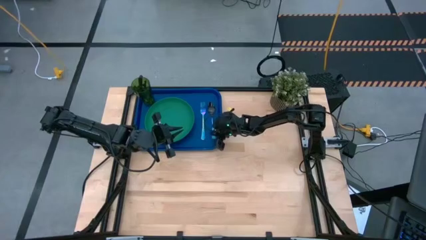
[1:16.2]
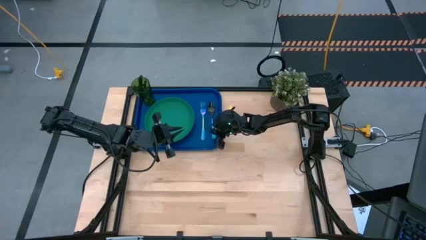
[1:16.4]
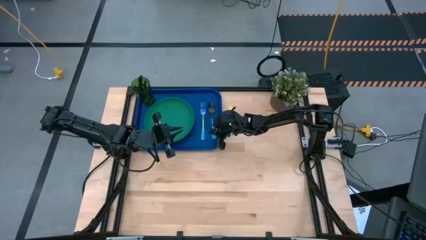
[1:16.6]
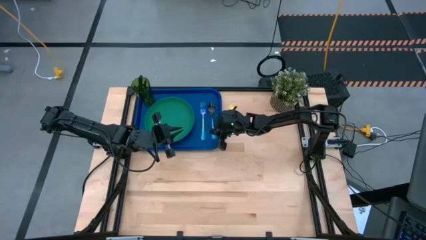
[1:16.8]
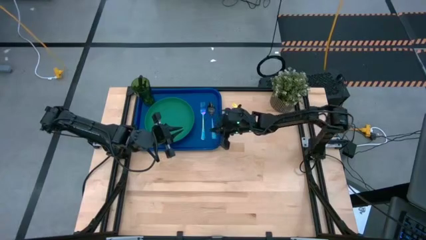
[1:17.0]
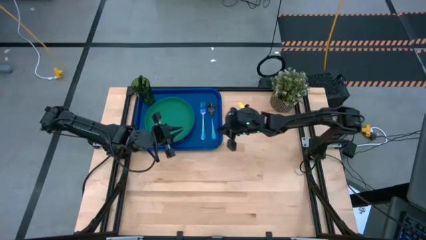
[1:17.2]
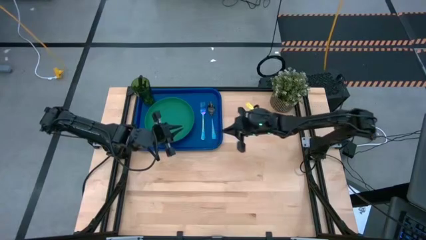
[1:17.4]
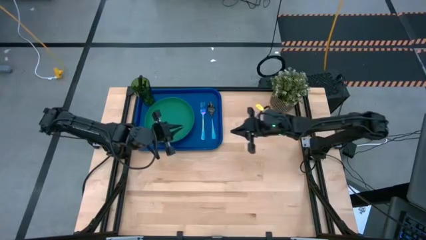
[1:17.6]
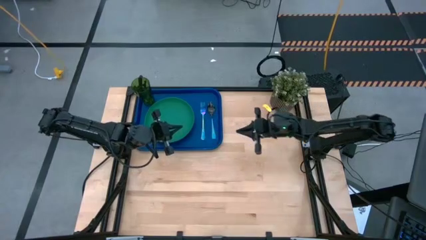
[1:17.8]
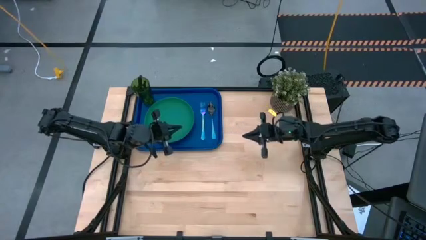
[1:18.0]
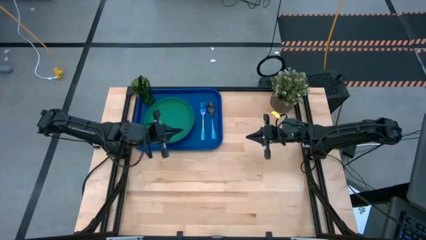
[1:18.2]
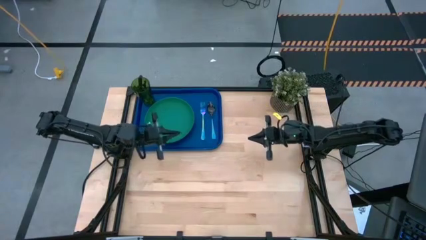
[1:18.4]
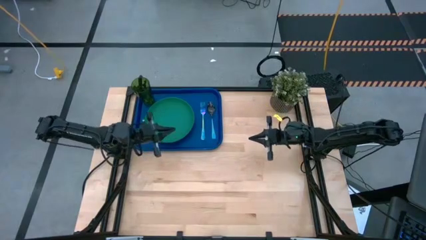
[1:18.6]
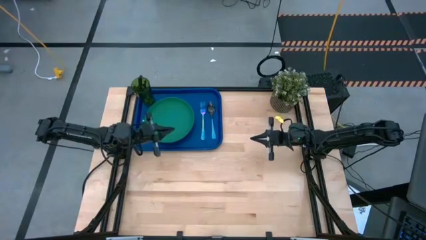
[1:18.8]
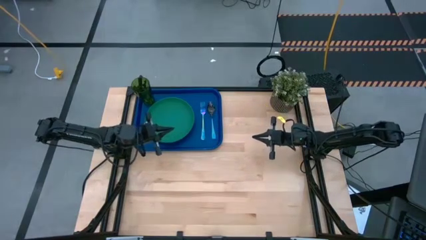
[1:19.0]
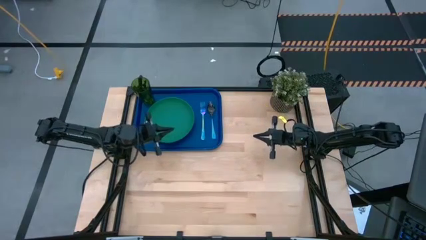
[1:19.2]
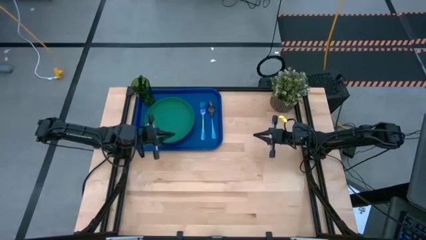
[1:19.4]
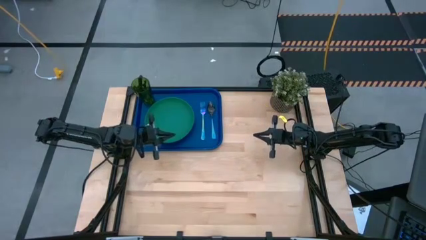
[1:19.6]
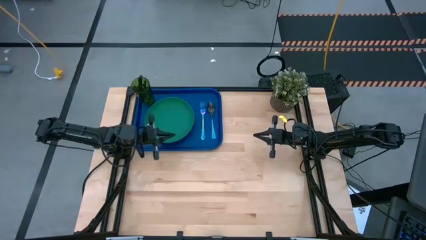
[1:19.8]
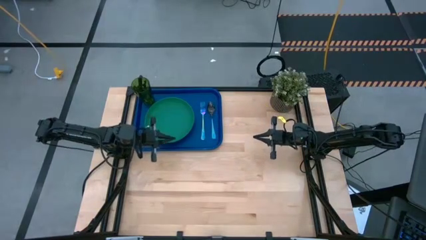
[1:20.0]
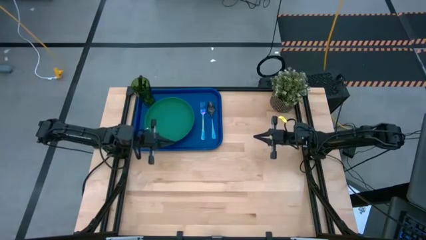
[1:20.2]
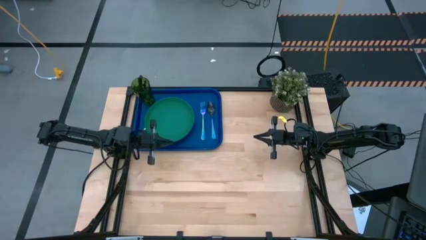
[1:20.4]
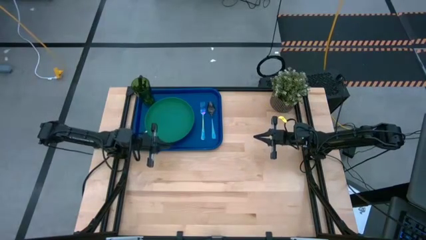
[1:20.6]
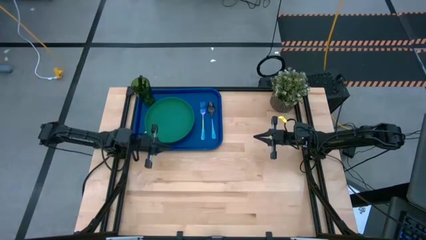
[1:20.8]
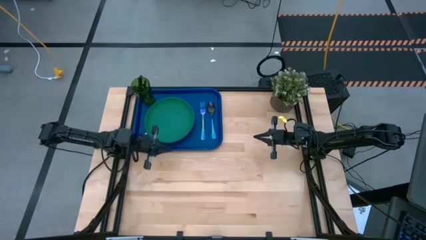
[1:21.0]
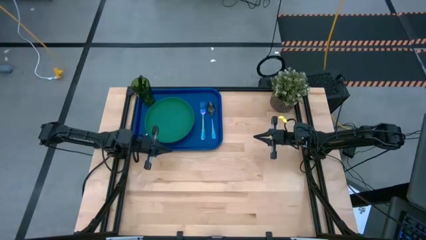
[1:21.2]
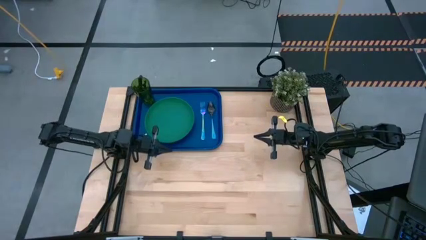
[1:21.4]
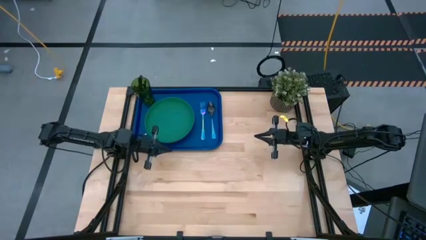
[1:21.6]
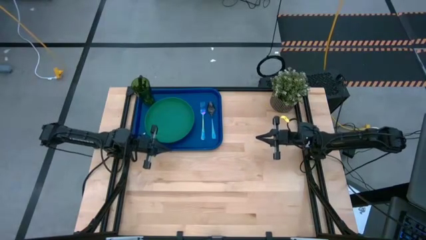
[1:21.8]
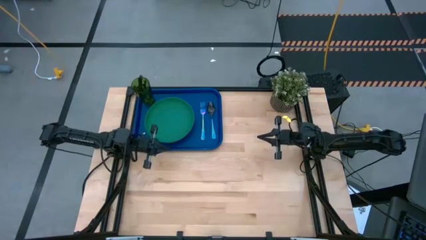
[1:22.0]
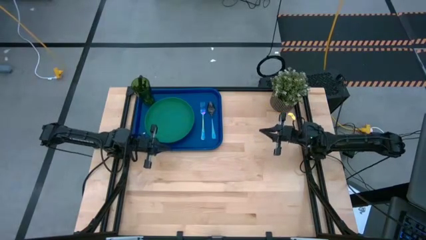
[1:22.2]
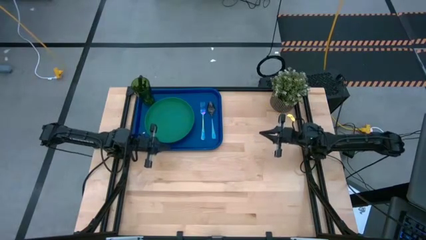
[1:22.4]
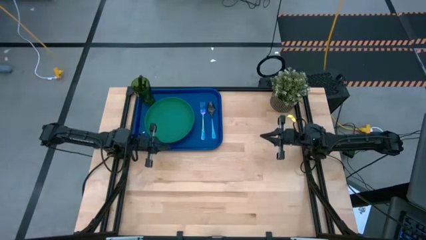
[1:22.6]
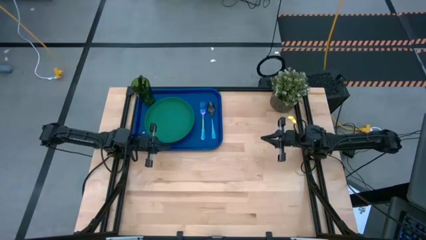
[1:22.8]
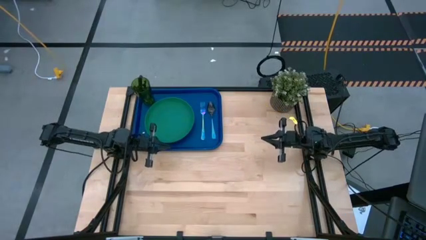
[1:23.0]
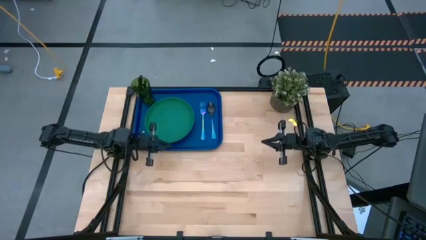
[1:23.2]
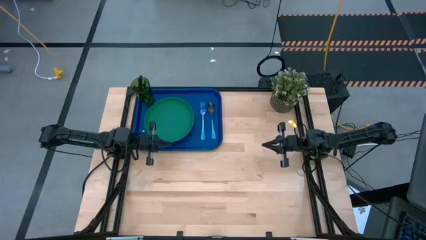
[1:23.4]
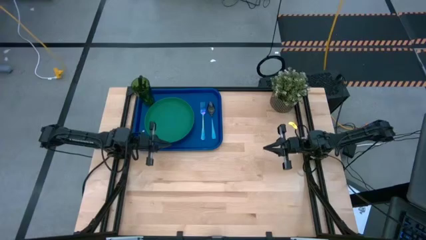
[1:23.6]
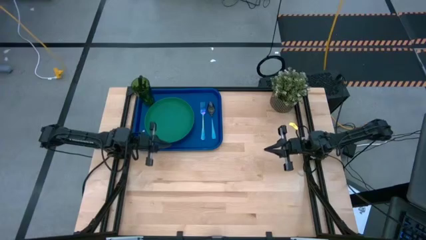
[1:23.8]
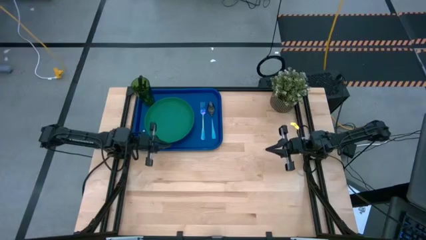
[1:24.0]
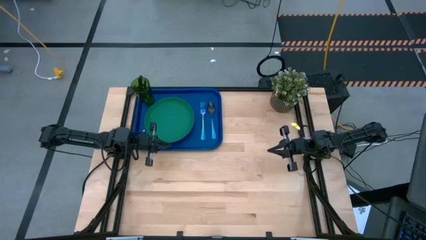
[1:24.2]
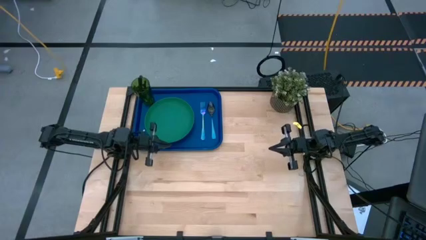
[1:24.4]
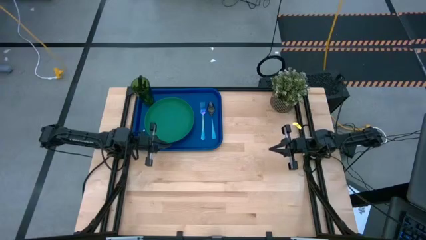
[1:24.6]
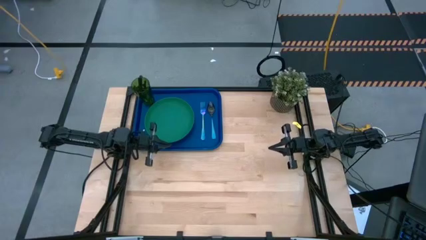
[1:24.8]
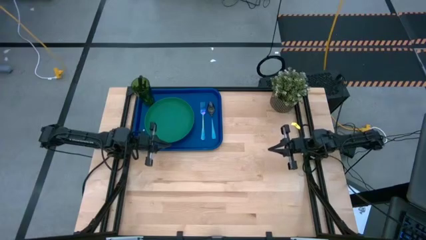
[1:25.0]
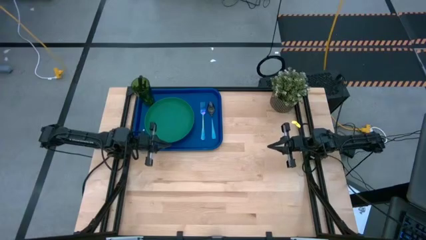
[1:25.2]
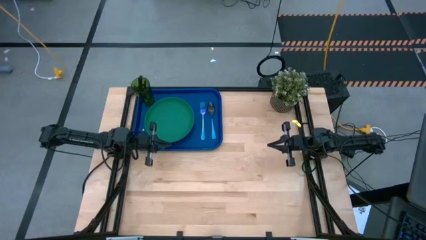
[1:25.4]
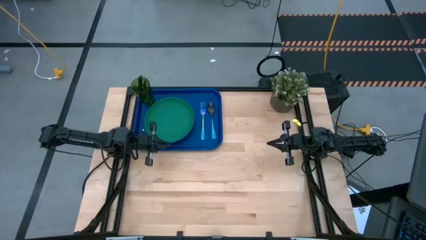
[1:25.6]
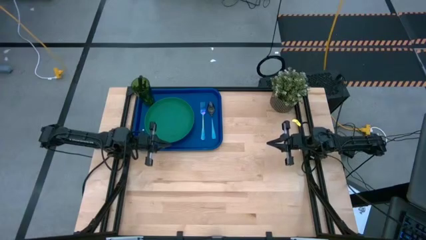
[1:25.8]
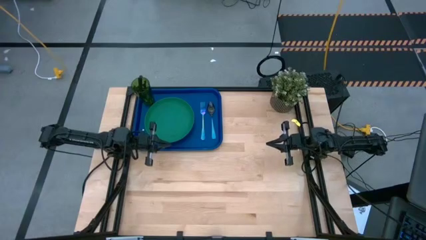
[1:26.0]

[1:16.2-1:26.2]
Task: Pick and place plate/cup/fork/spoon on tray
Return To Home Position

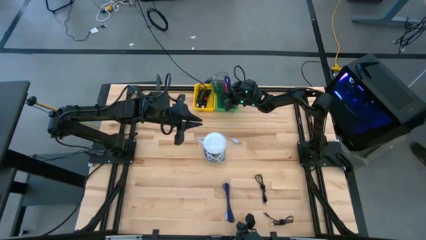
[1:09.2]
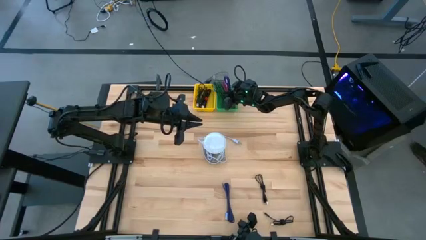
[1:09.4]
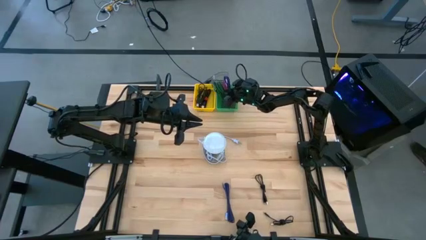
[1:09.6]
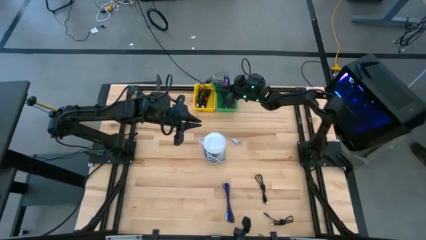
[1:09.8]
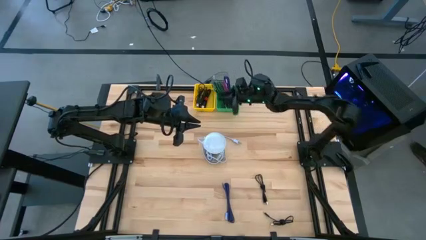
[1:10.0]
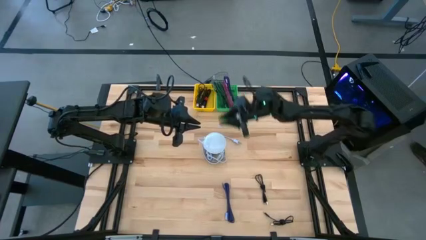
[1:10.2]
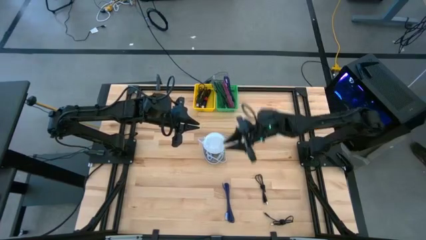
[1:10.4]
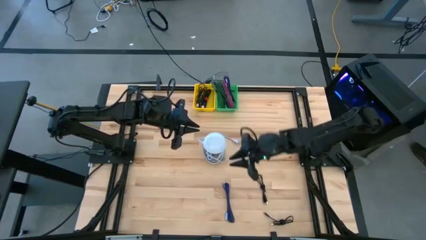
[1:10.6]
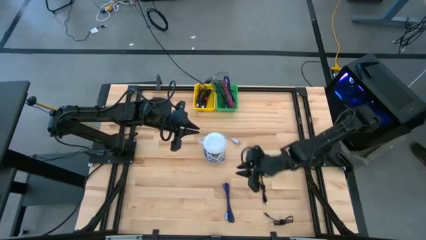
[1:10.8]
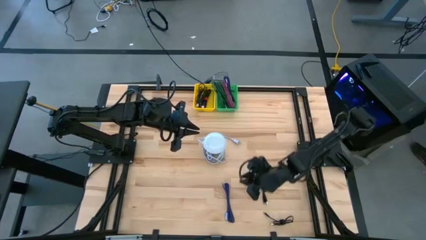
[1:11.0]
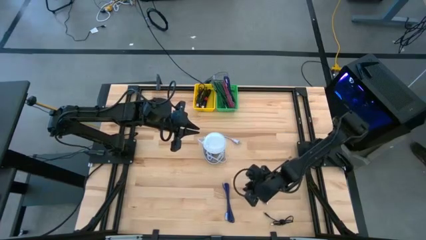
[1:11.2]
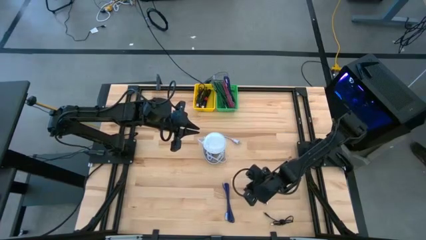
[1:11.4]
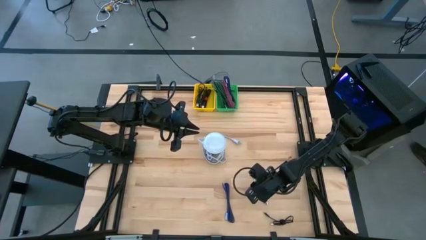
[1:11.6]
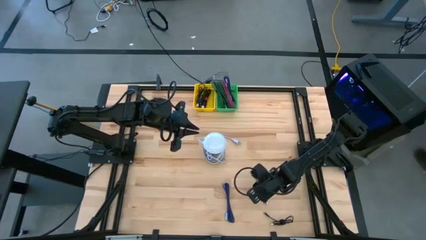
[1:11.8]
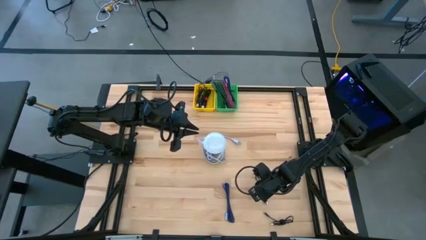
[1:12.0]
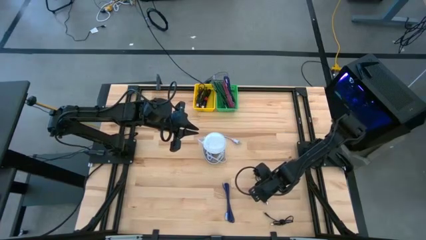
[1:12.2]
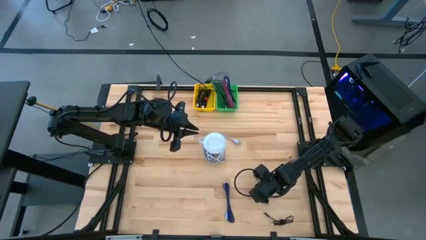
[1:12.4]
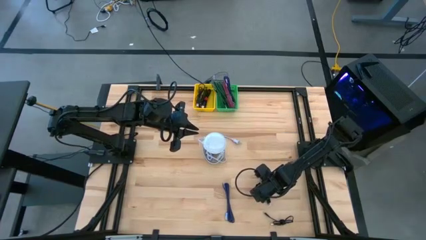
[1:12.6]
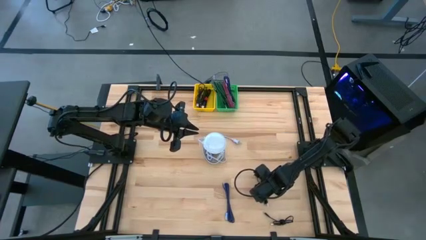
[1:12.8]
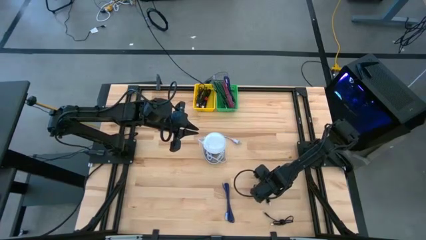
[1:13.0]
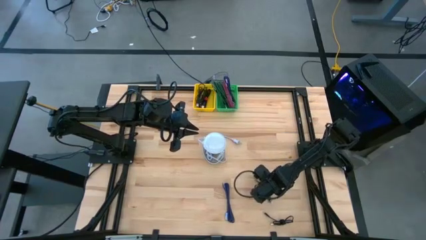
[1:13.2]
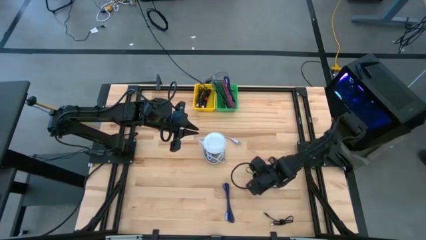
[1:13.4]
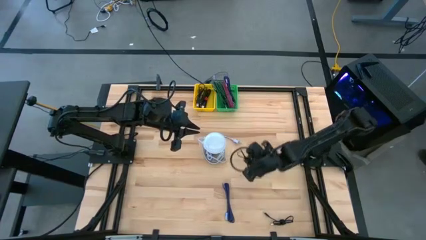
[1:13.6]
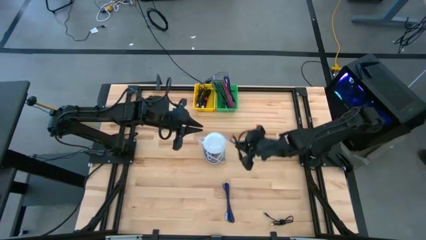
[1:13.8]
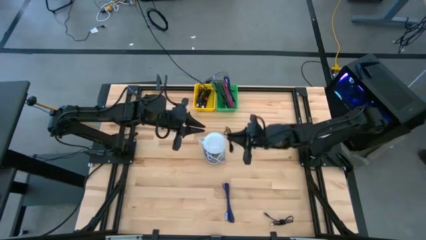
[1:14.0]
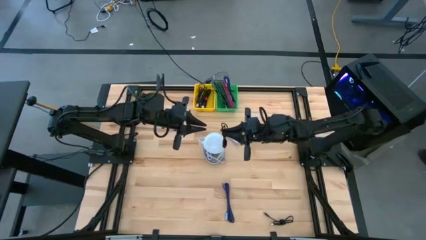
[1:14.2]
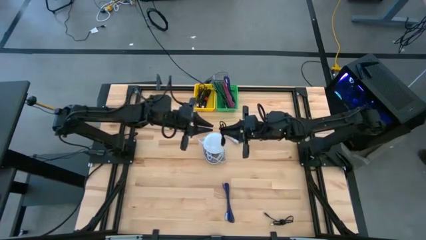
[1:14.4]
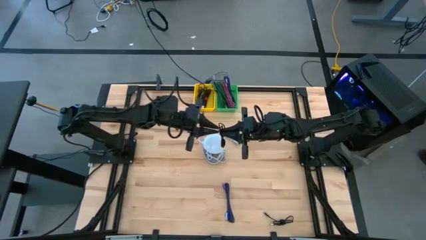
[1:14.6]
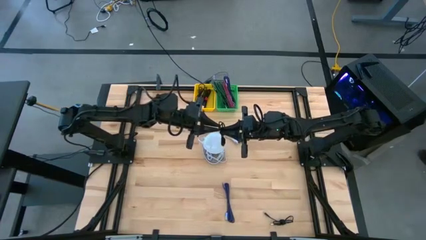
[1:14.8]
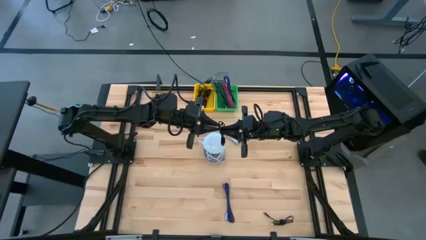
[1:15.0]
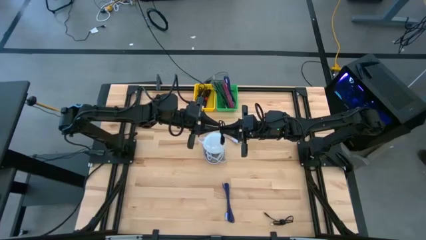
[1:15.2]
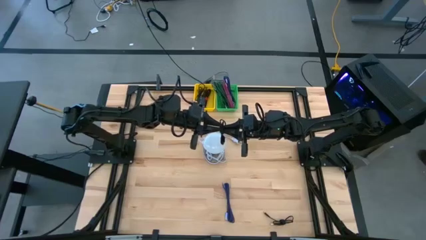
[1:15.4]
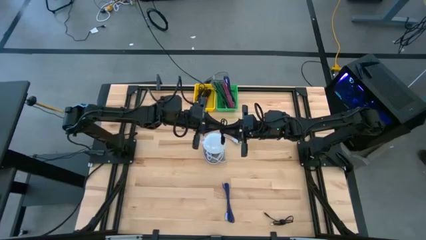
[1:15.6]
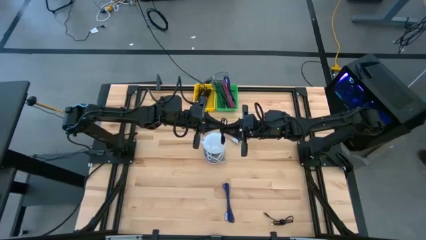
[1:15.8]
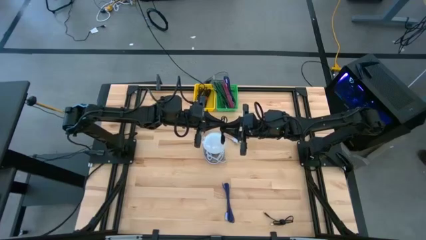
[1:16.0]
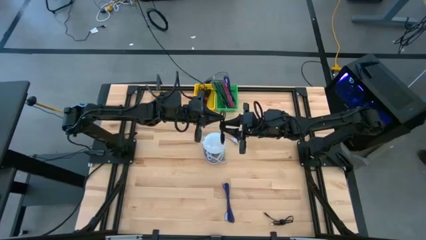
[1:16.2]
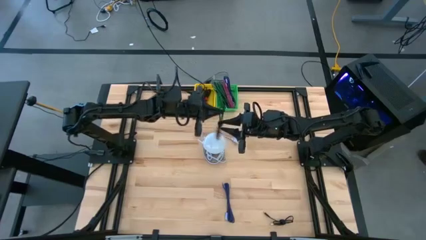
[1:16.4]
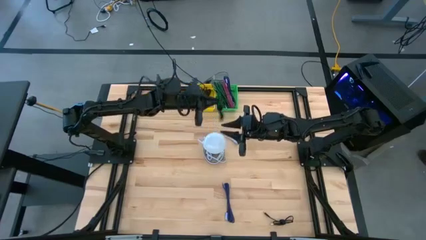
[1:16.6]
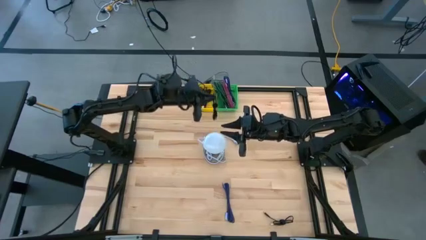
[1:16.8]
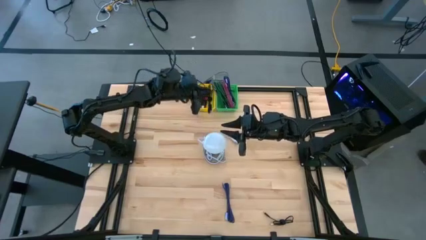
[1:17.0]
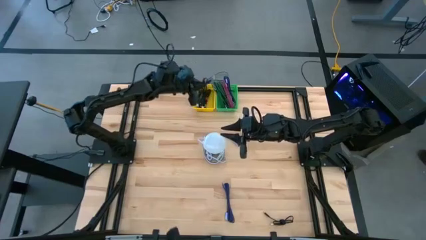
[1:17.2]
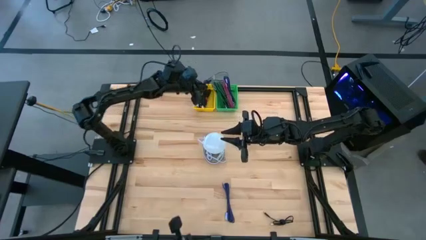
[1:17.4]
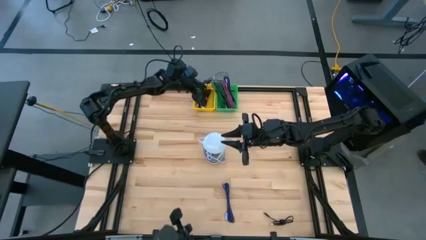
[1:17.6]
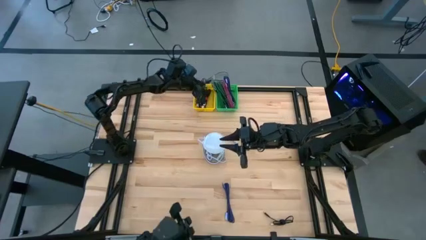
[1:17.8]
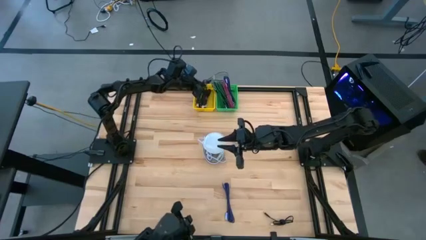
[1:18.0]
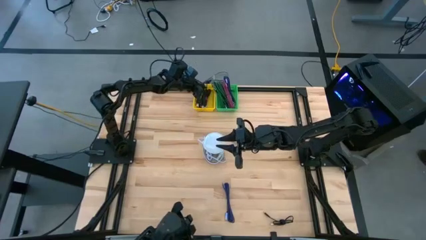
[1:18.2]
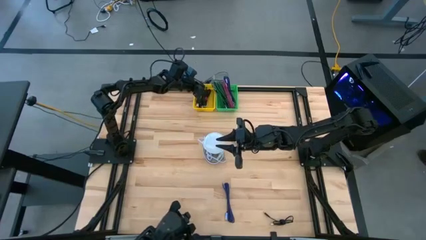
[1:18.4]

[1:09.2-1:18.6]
Task: Pick & Place USB Port
Put the black charger cable into the yellow bin
